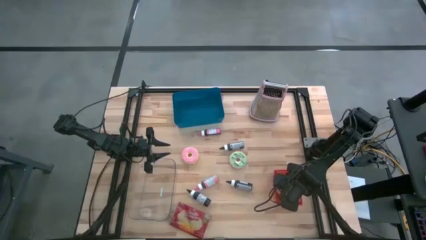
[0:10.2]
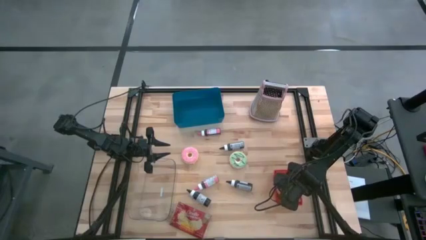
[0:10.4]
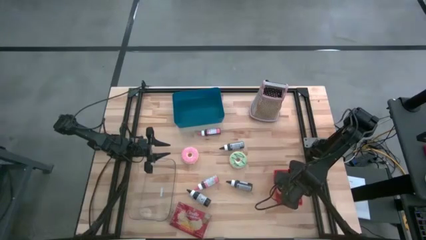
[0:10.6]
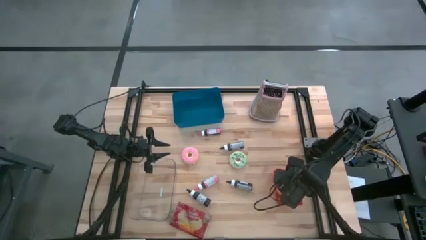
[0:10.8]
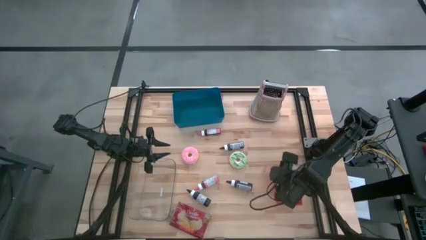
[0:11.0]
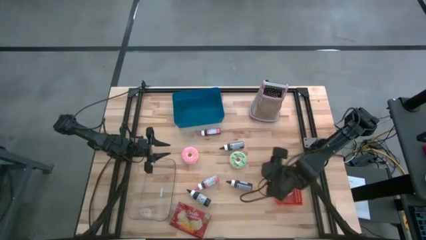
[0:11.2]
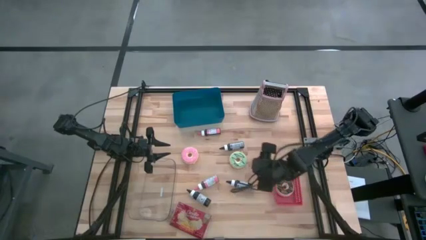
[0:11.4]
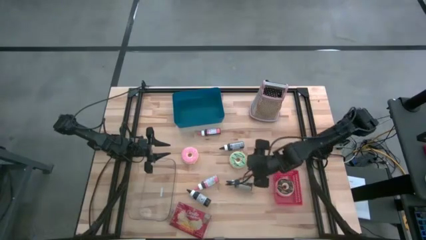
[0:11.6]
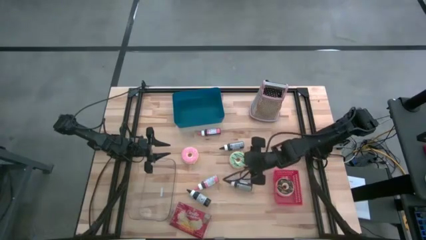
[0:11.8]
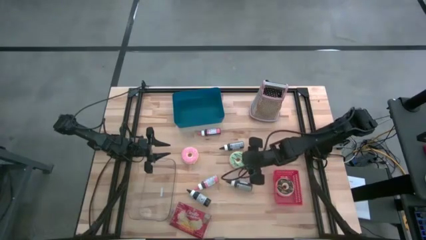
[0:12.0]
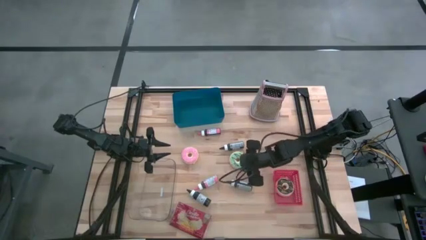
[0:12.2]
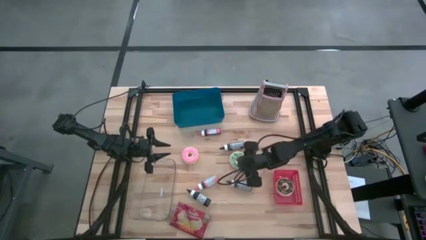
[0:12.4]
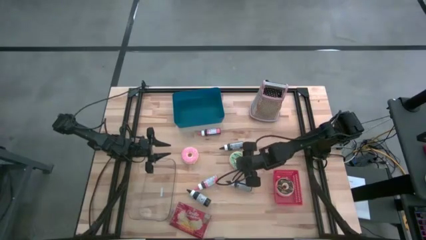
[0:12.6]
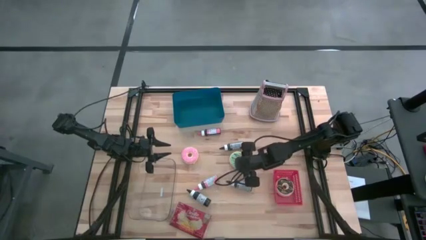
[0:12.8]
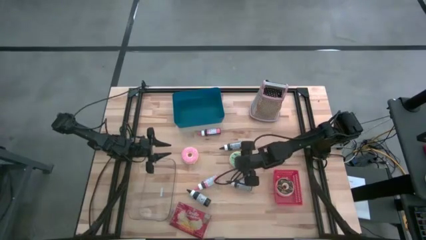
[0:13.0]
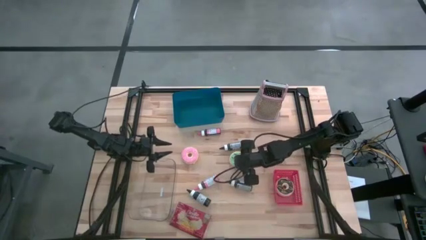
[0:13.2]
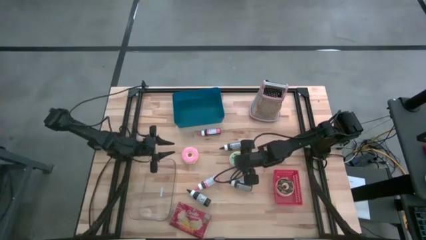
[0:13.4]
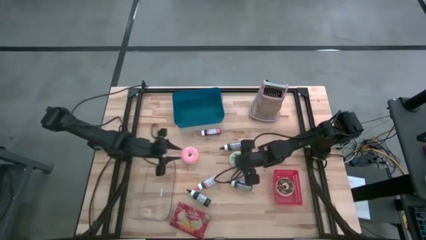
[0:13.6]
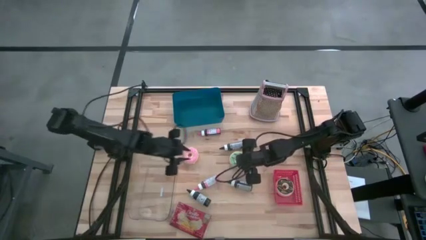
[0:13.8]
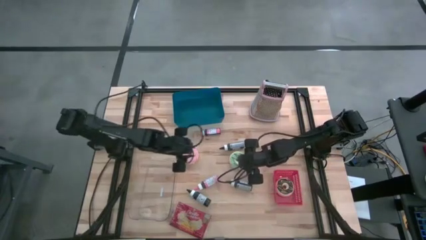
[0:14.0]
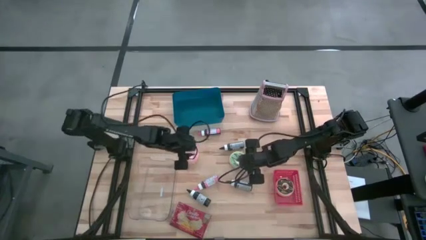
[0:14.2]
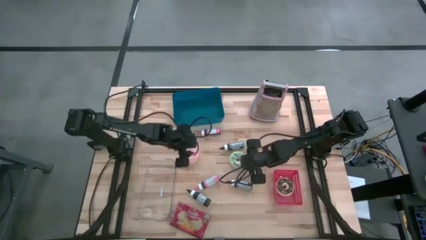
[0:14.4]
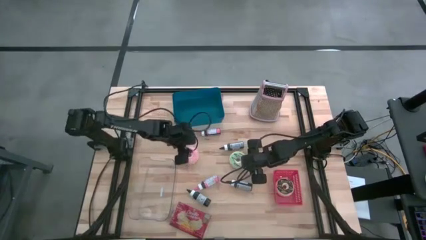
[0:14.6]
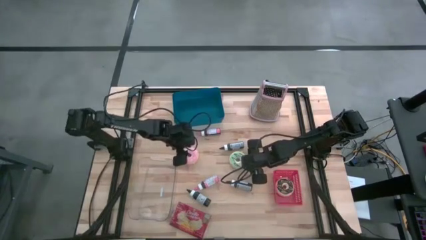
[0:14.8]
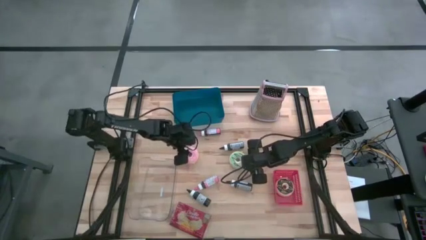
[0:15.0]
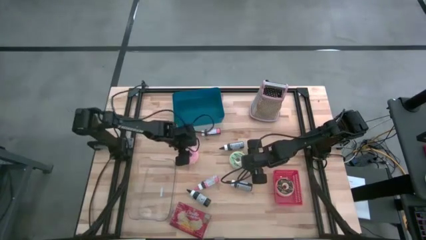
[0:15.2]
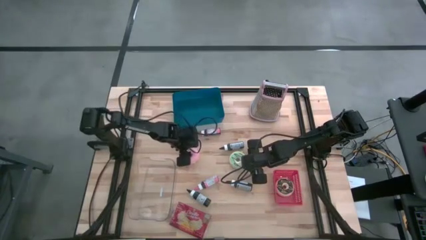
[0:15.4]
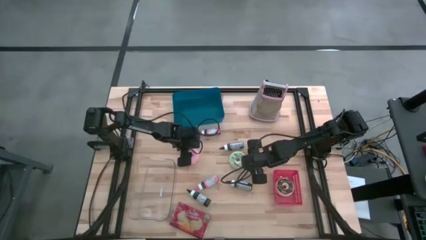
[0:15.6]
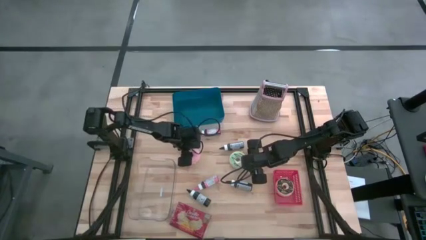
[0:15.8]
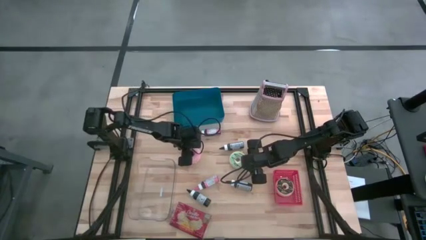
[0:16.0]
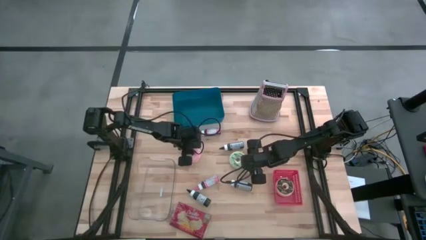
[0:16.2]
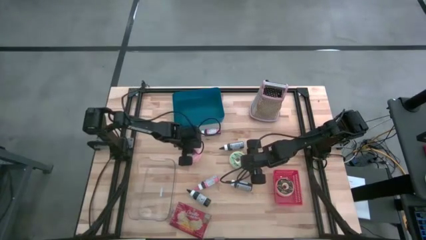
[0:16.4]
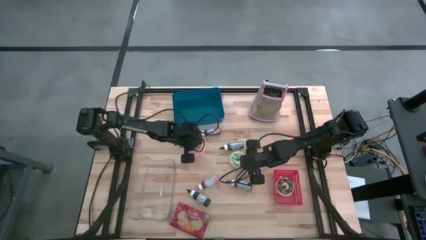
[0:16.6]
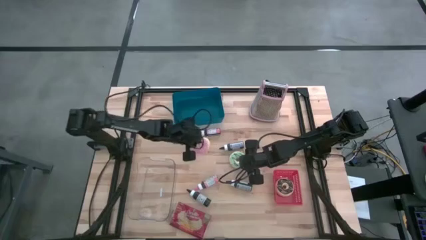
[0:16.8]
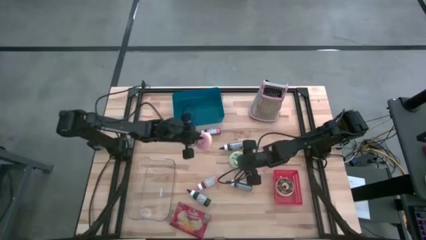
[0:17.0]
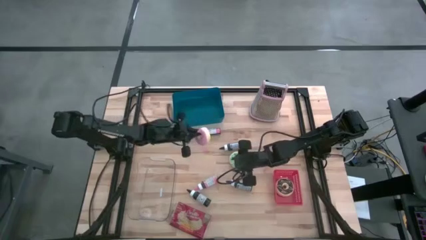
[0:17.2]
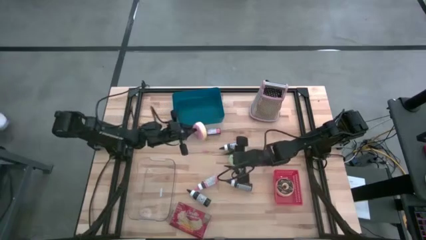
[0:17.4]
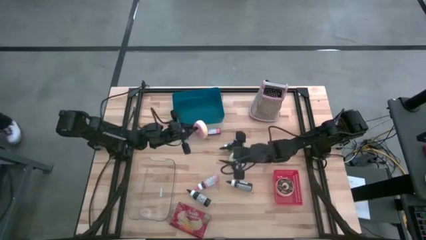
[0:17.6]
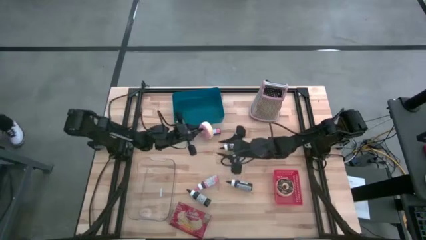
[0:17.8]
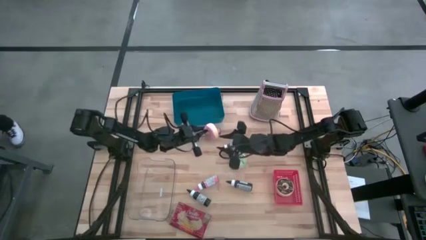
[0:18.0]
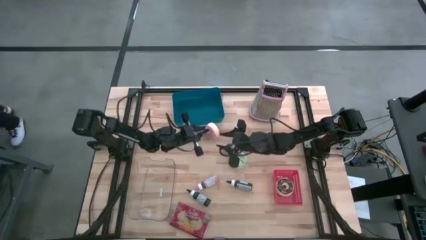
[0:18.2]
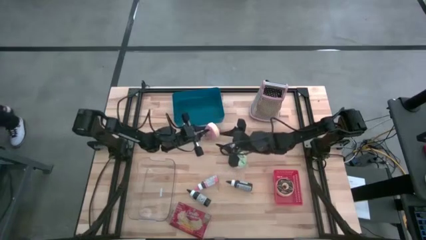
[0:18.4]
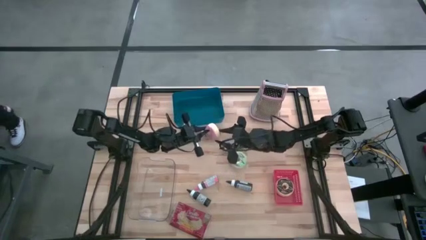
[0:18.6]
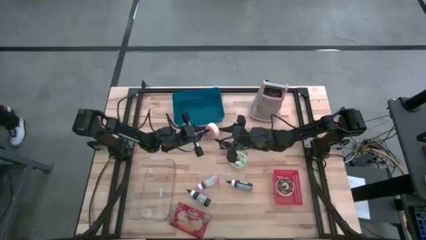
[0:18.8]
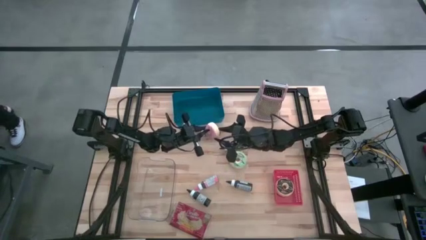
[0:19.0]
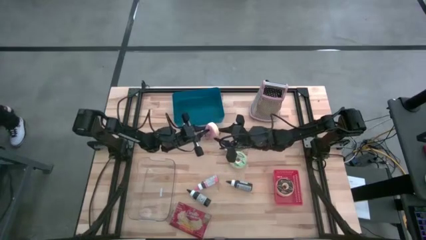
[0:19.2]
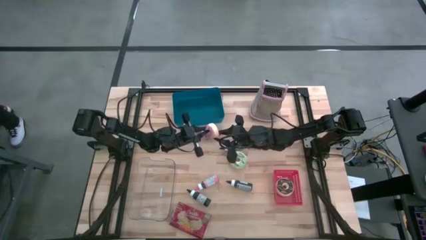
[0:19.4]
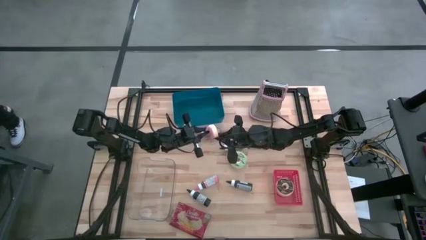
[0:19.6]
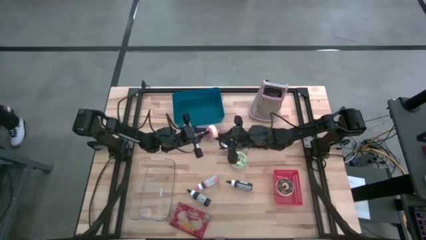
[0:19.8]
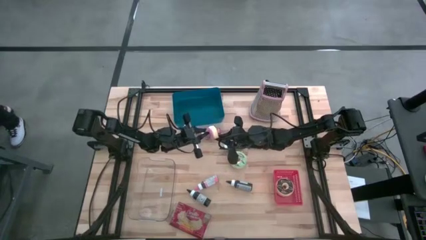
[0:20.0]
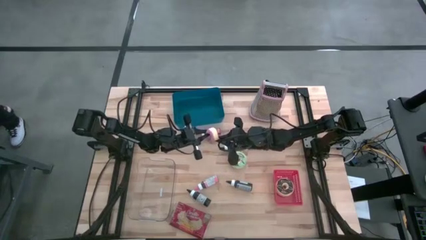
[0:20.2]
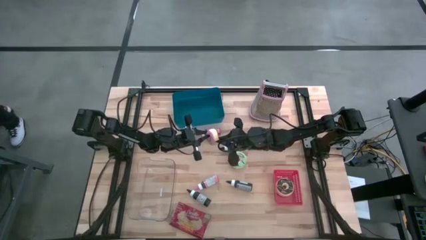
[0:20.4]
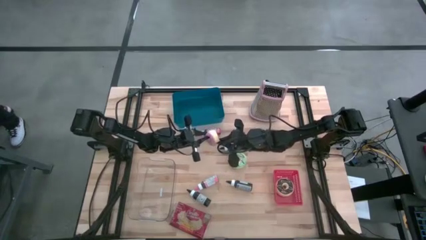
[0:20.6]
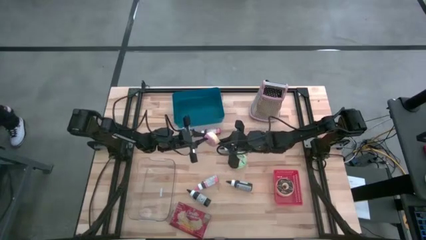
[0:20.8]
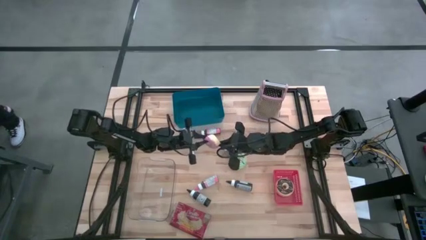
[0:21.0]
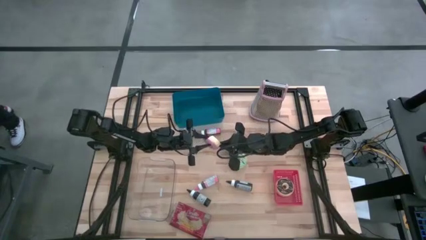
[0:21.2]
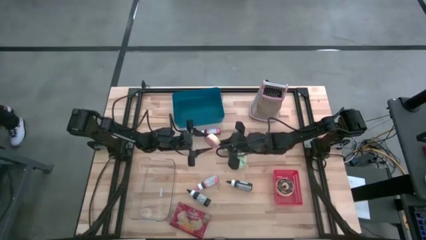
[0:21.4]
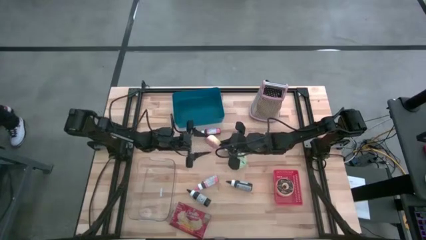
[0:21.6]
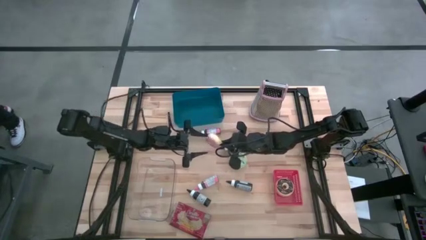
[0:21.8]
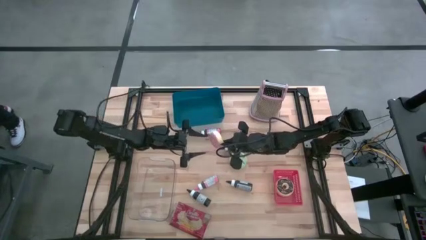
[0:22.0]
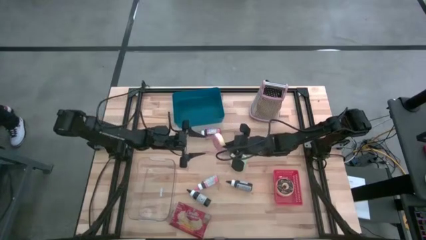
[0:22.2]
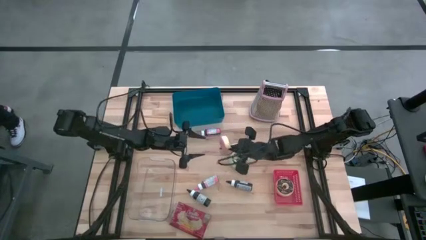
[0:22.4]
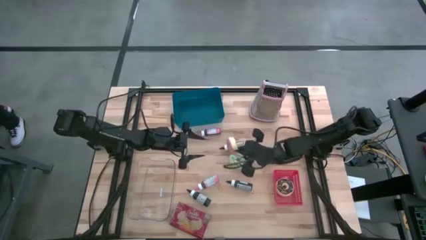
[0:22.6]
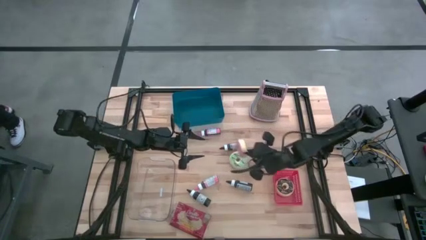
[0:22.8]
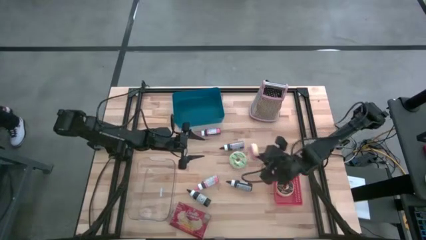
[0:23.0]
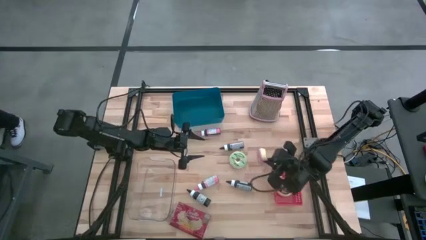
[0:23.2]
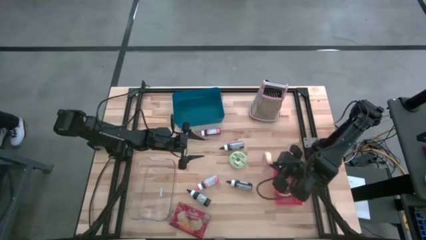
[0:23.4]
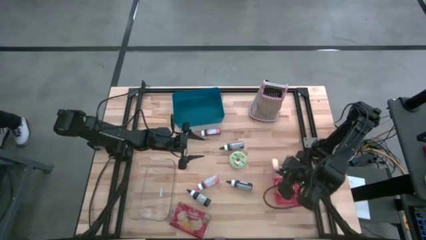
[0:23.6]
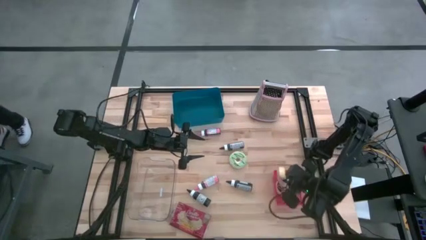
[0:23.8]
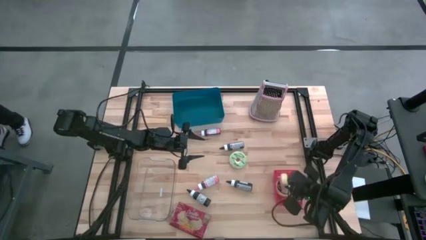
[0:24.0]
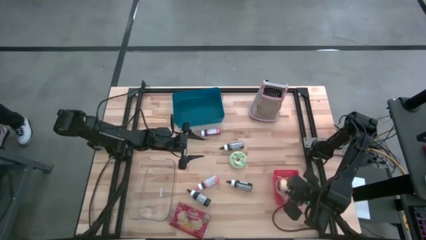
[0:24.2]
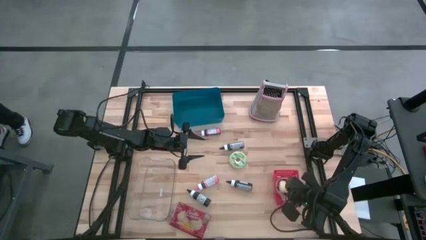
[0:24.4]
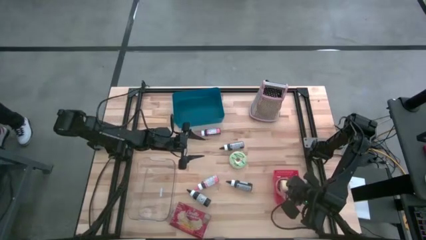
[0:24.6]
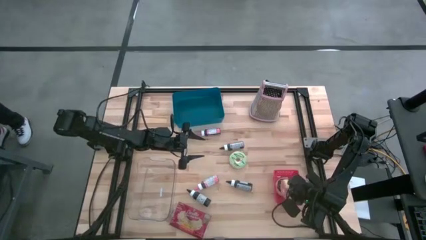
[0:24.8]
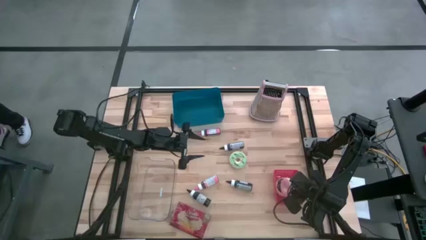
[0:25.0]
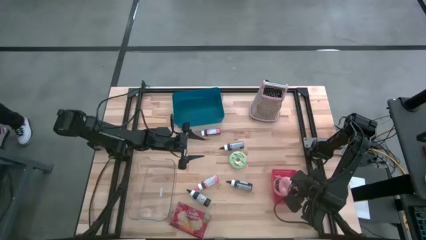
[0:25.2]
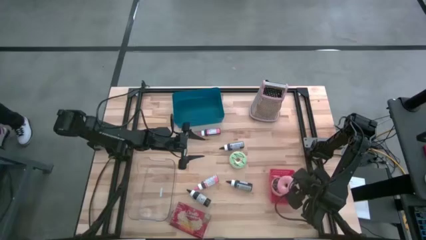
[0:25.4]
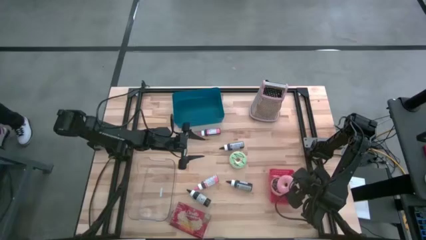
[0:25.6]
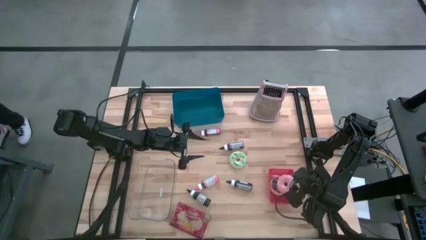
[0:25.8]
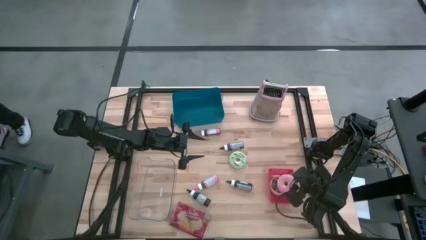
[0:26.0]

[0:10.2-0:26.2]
Task: Pick & Place Food Item
Put the pink donut into the red basket
